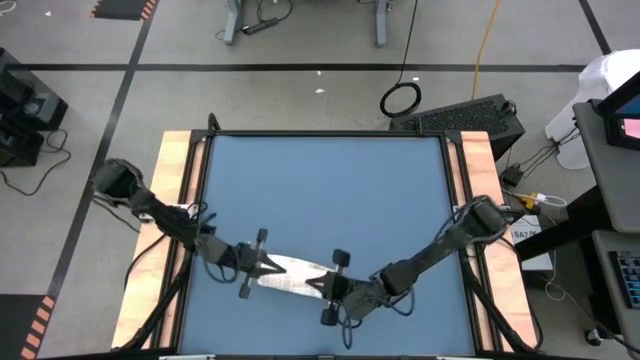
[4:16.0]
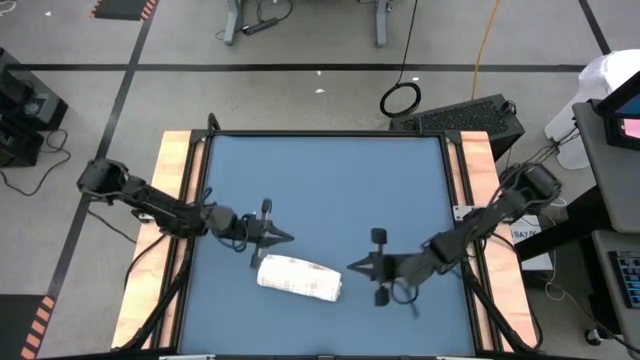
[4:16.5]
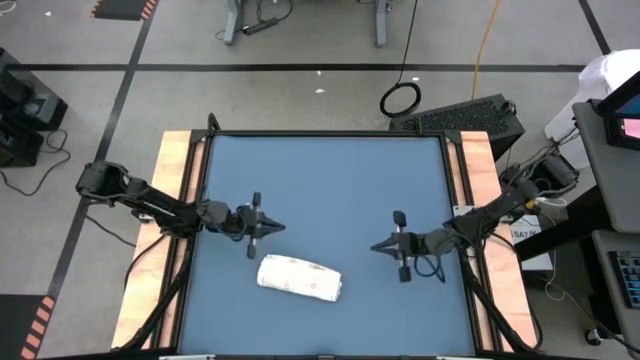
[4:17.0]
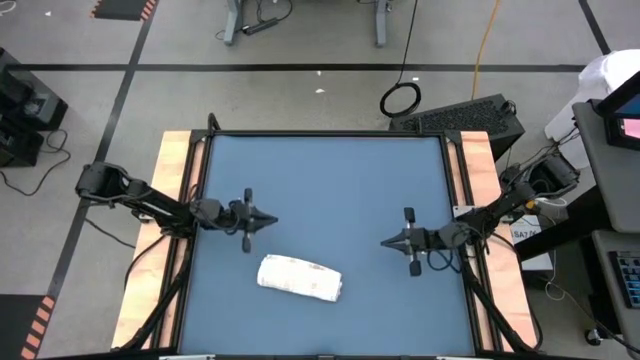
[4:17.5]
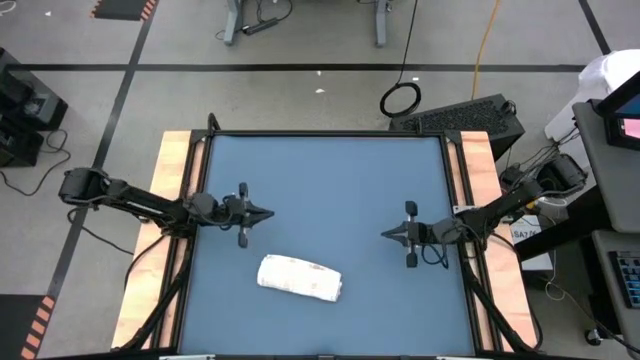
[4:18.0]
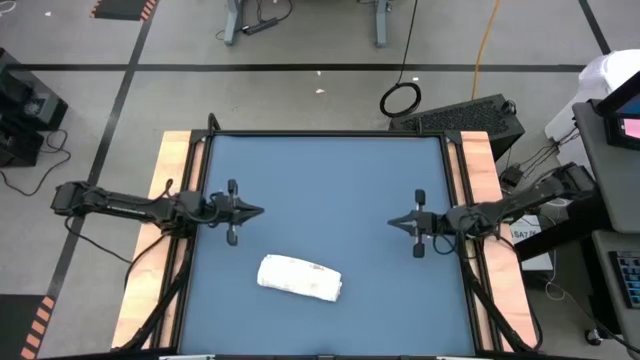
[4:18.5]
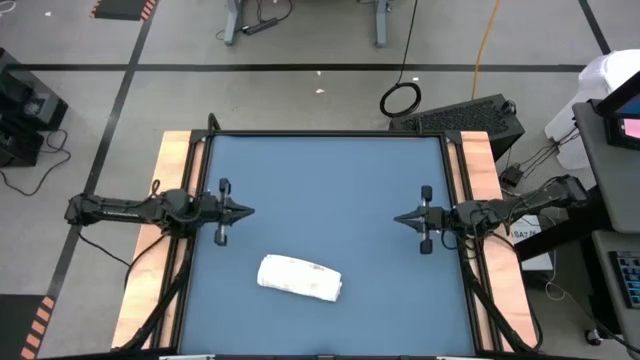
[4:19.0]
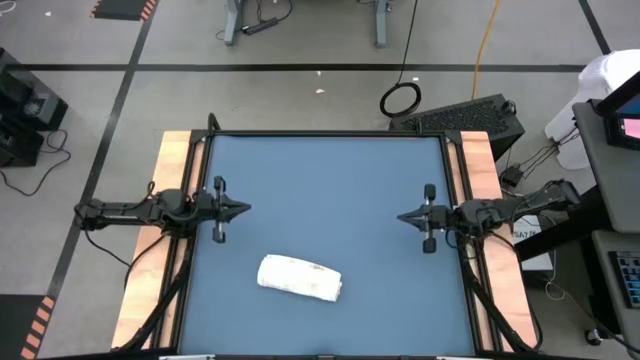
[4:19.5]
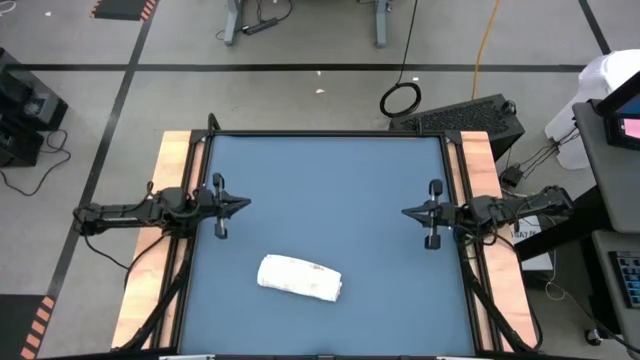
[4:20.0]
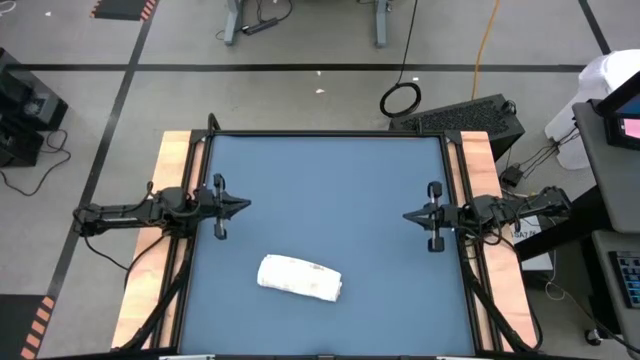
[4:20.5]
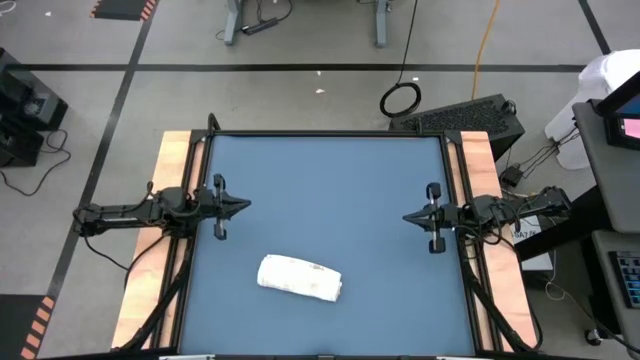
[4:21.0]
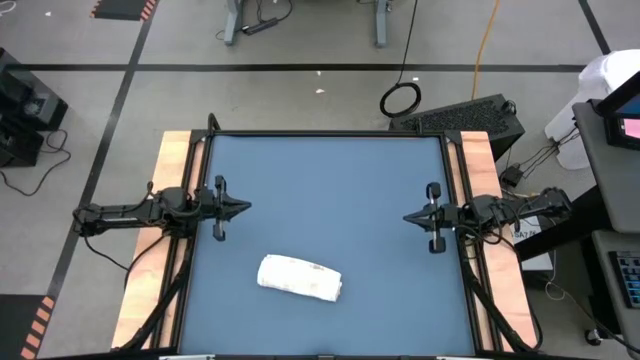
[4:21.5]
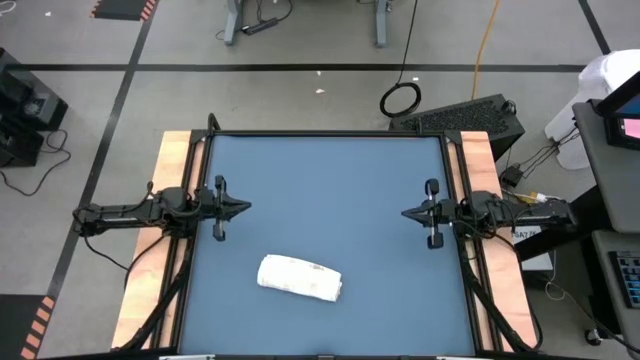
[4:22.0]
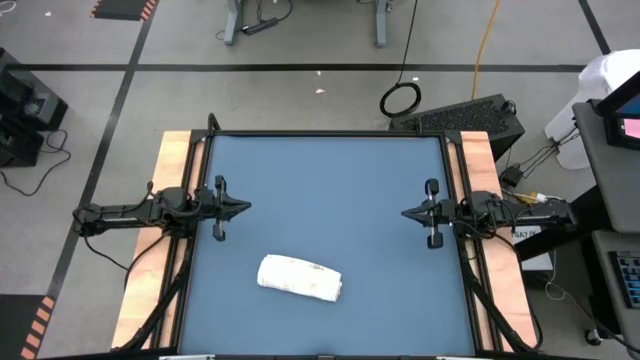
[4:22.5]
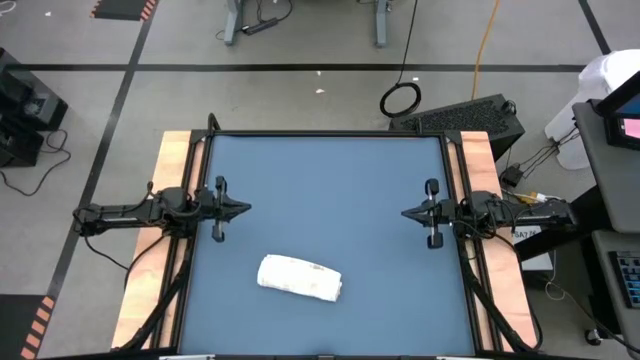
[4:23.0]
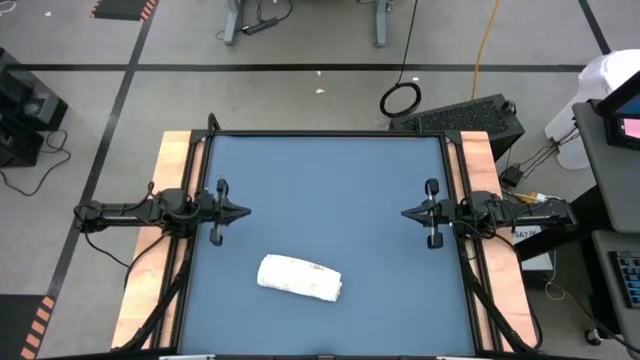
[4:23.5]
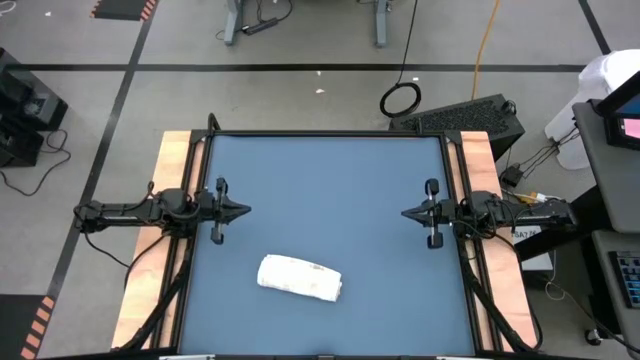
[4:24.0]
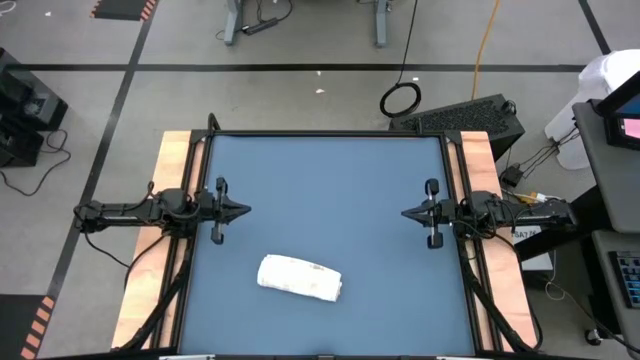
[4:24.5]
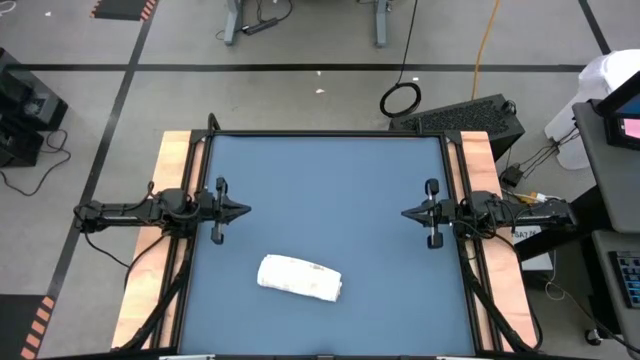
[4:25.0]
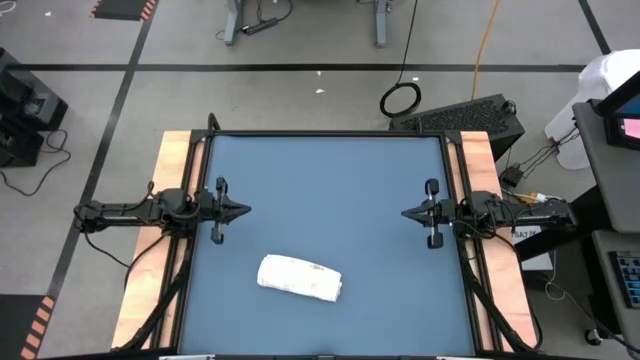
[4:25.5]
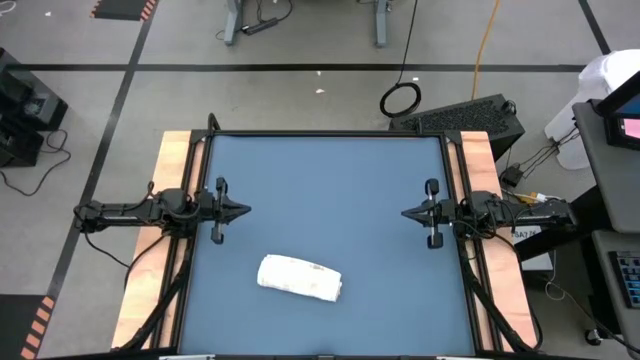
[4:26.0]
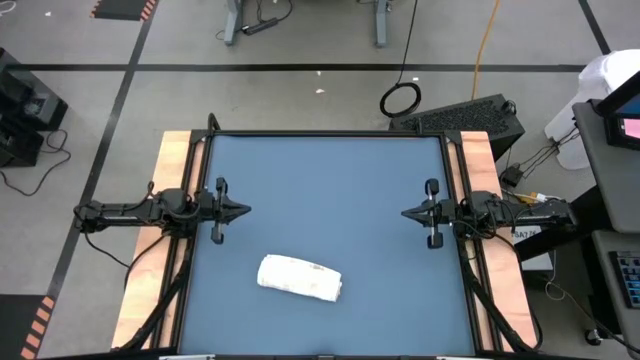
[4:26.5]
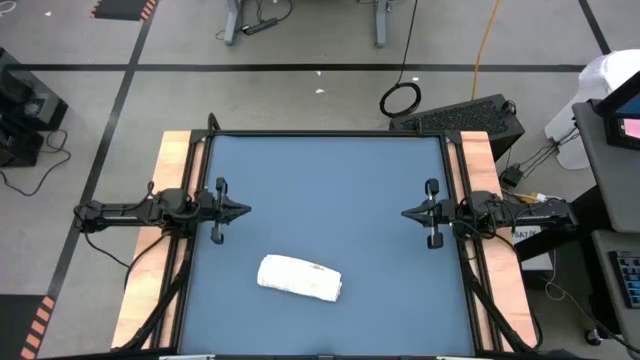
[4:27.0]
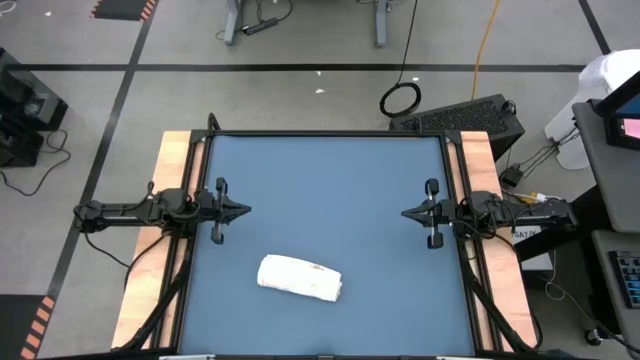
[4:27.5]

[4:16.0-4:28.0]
Task: Roll towel into tight, uniform cylinder
Return to Home Position

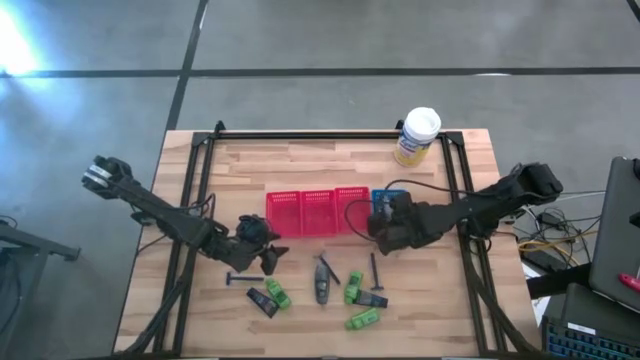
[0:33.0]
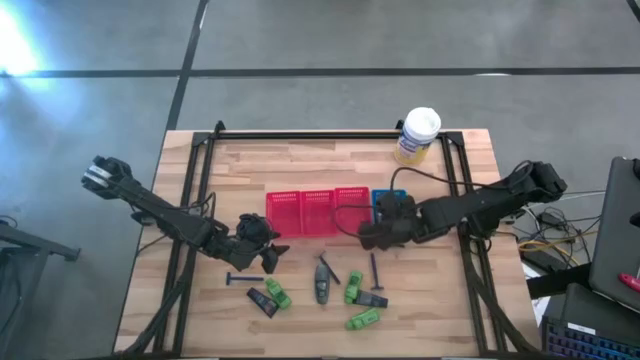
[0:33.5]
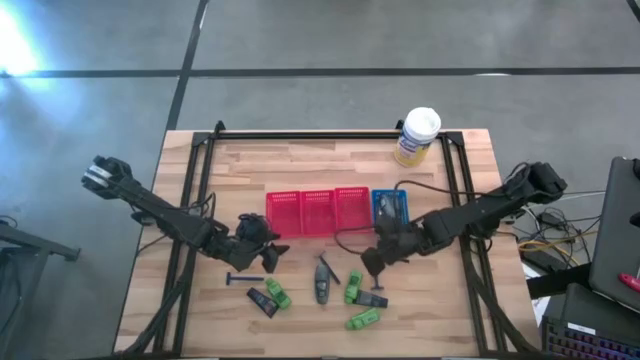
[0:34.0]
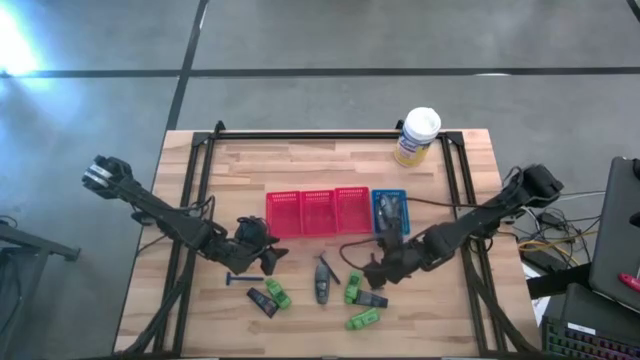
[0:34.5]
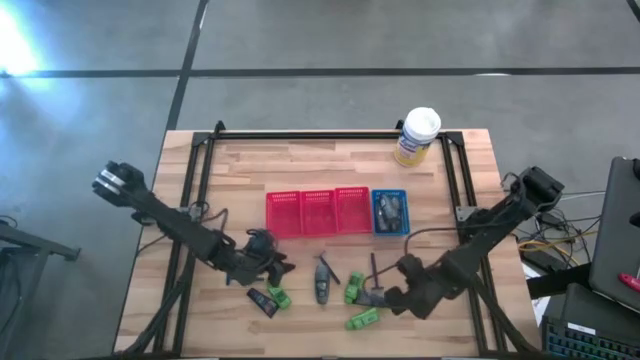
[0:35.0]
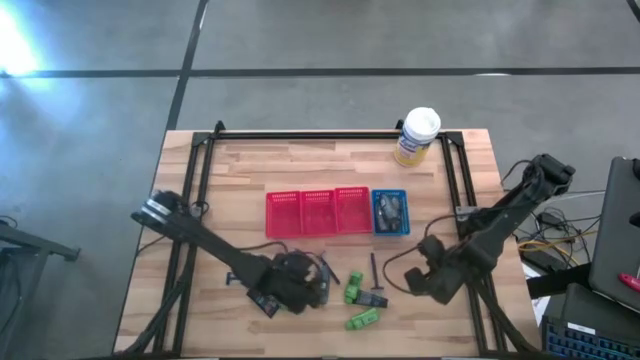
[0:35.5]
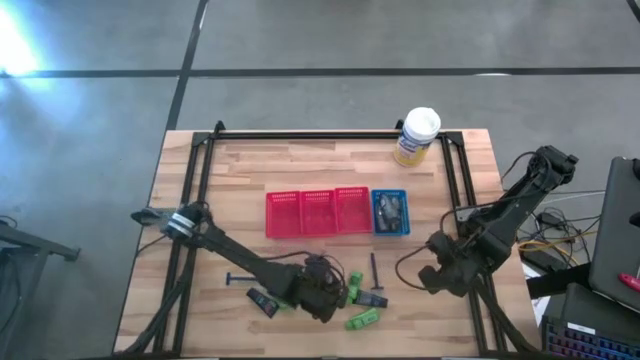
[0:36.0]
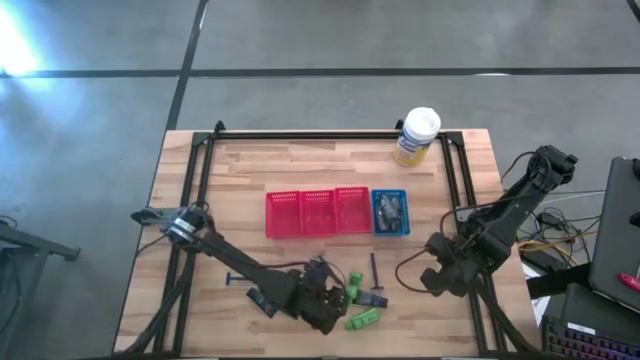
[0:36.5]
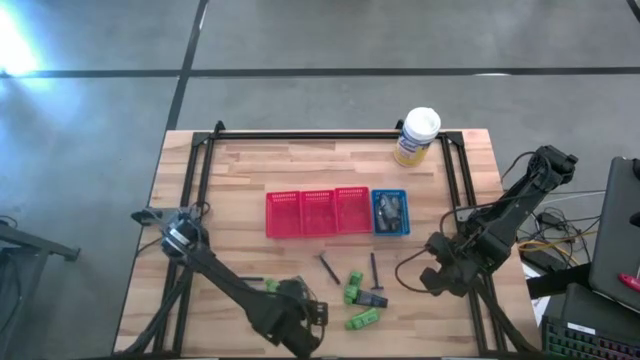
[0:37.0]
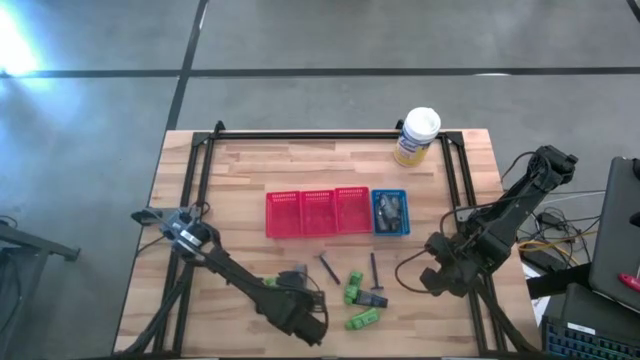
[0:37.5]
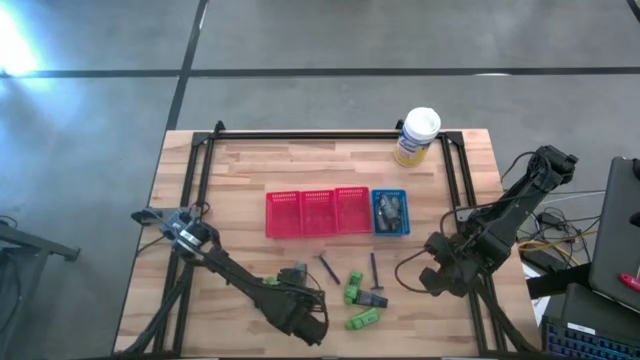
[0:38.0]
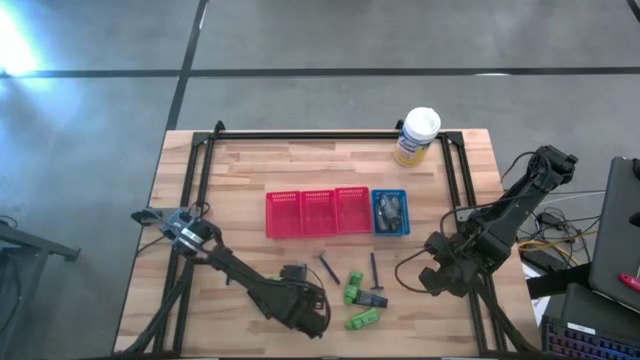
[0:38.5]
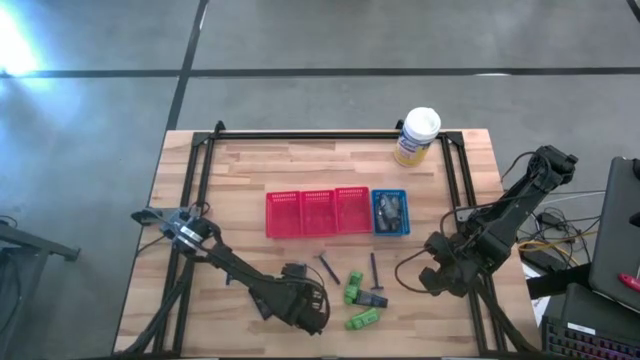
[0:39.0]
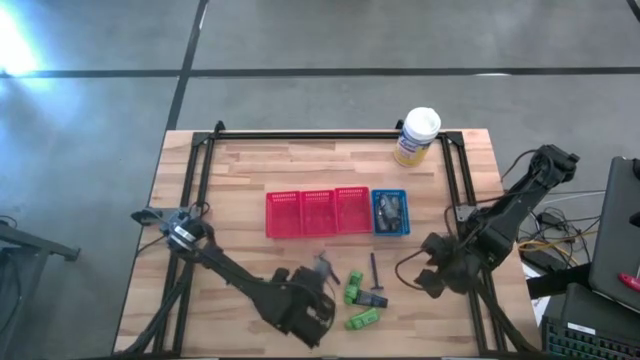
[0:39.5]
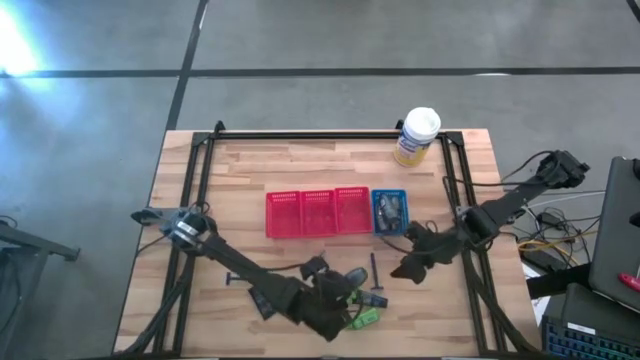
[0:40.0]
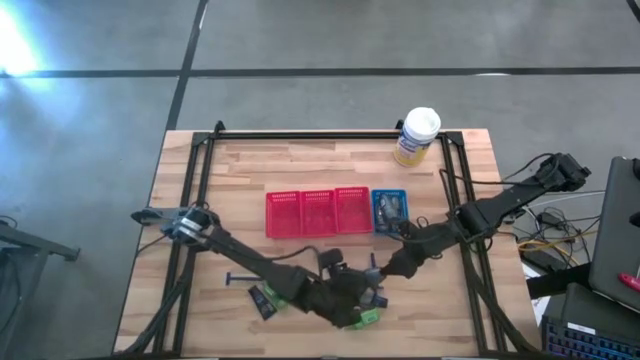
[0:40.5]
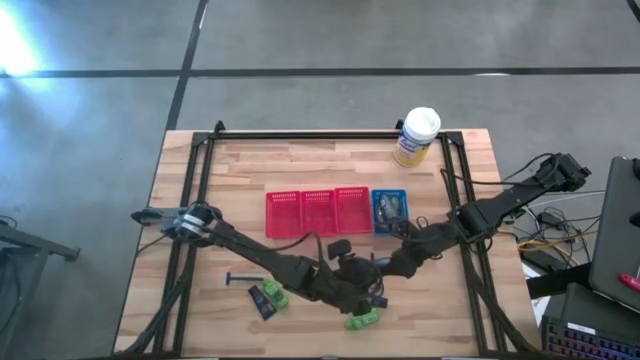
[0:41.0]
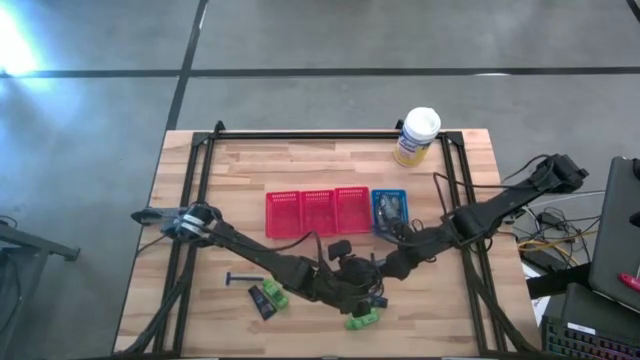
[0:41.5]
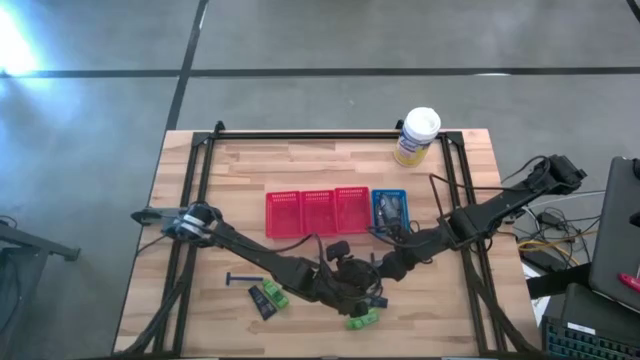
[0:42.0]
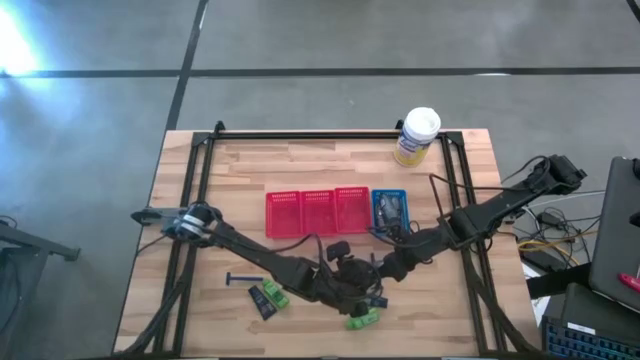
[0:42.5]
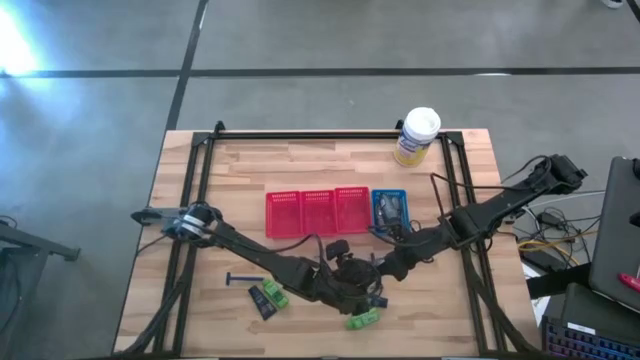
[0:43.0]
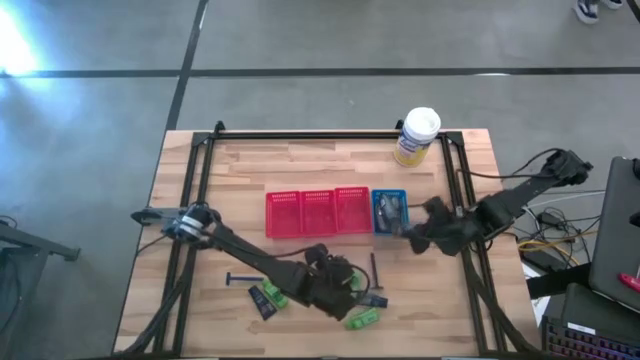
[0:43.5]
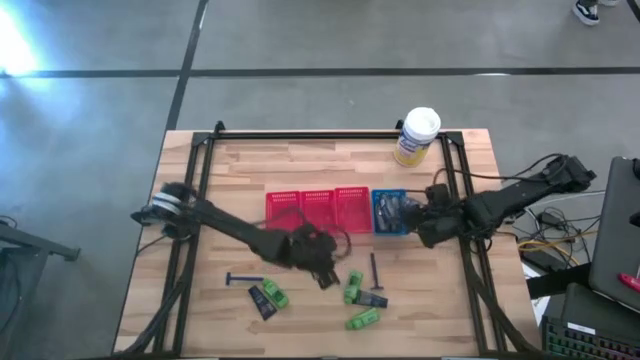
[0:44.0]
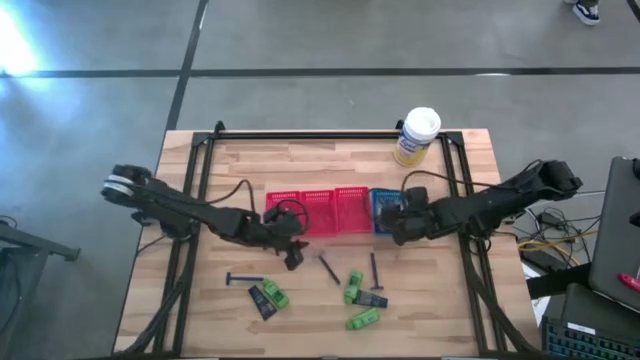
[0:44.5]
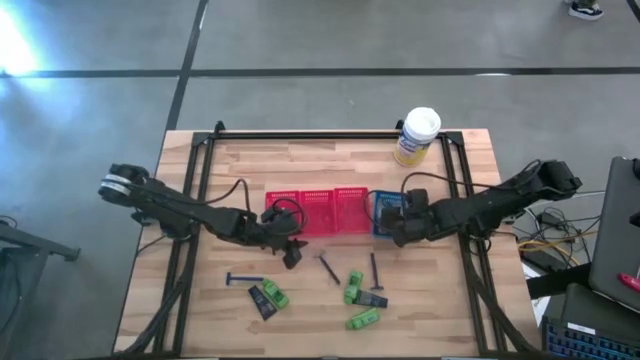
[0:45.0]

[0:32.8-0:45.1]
Task: Pick & Place Travel size toiletries
Put the gray deodorant into the blue bin
